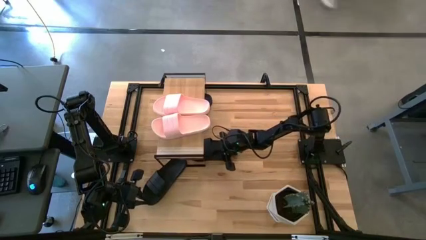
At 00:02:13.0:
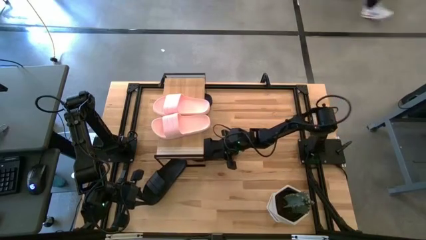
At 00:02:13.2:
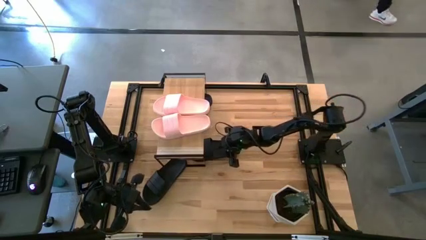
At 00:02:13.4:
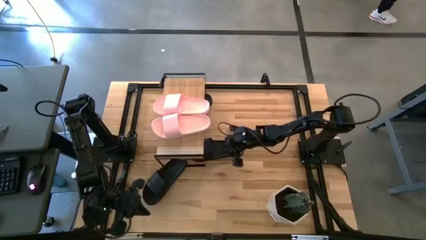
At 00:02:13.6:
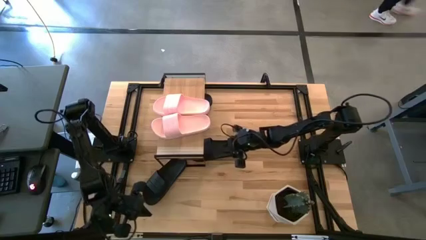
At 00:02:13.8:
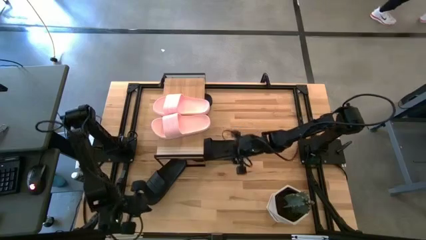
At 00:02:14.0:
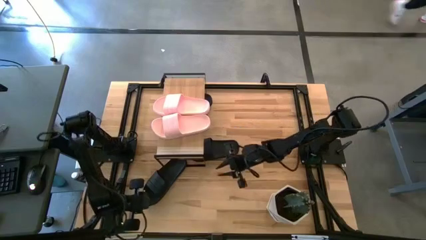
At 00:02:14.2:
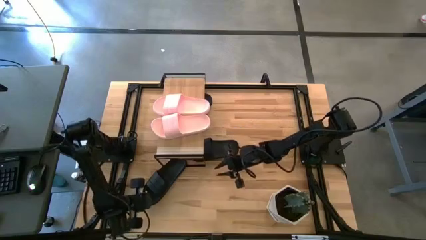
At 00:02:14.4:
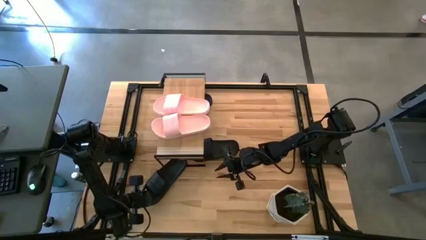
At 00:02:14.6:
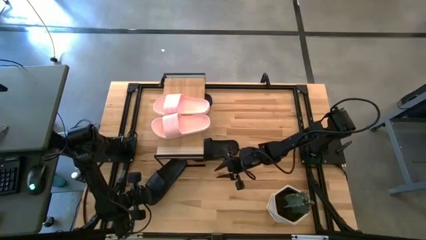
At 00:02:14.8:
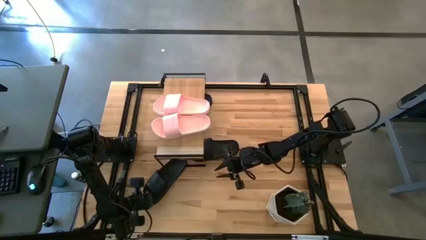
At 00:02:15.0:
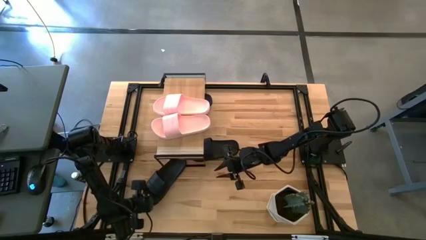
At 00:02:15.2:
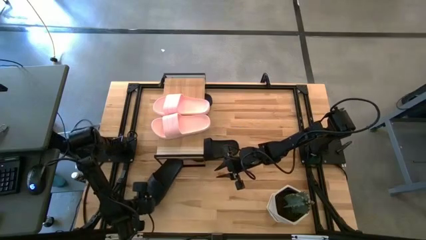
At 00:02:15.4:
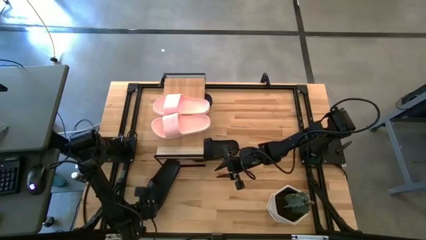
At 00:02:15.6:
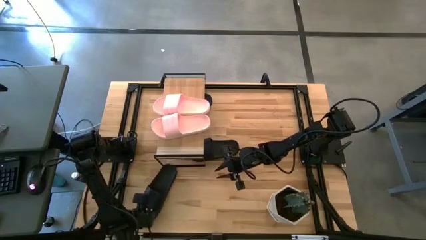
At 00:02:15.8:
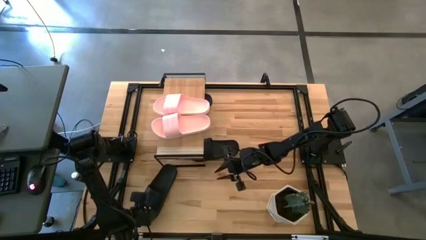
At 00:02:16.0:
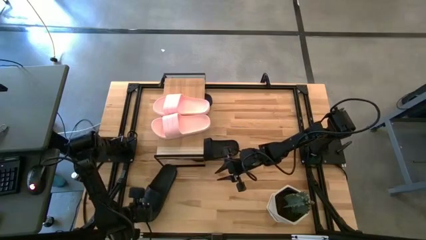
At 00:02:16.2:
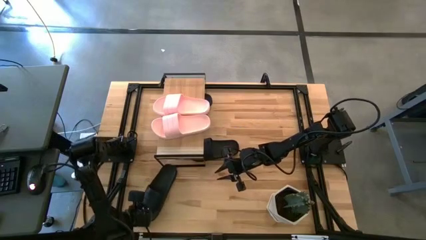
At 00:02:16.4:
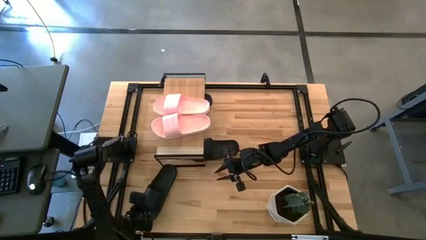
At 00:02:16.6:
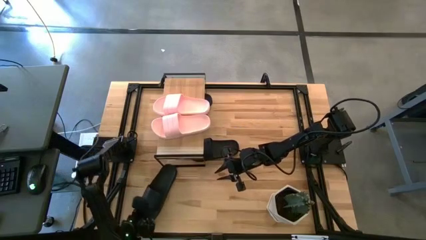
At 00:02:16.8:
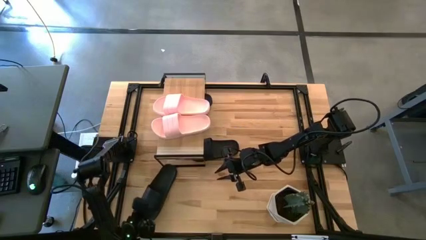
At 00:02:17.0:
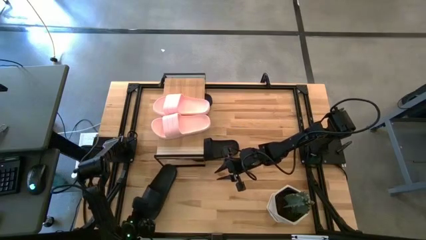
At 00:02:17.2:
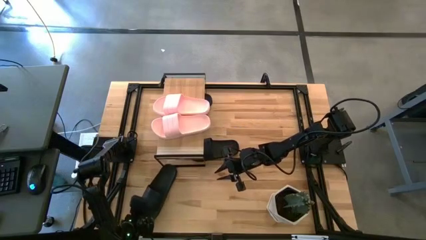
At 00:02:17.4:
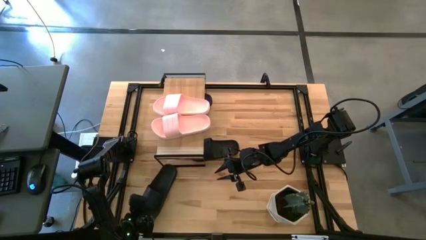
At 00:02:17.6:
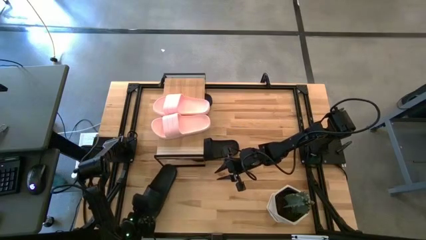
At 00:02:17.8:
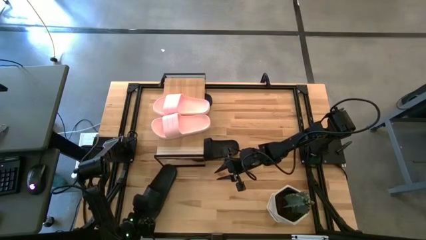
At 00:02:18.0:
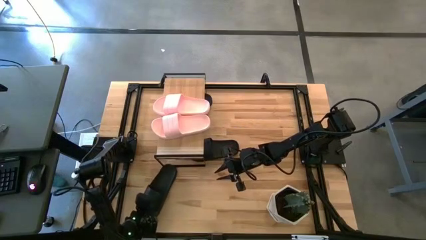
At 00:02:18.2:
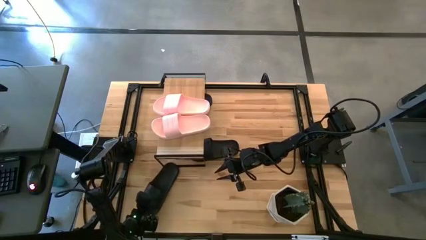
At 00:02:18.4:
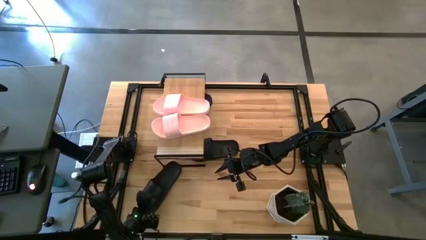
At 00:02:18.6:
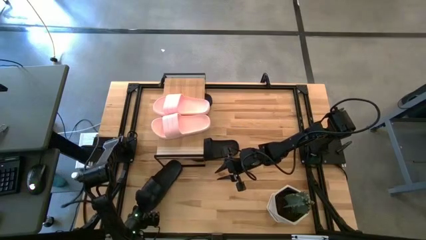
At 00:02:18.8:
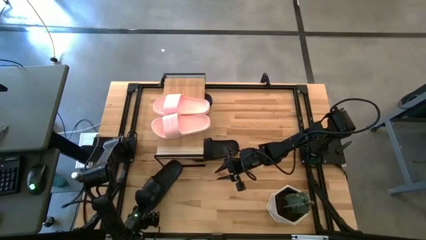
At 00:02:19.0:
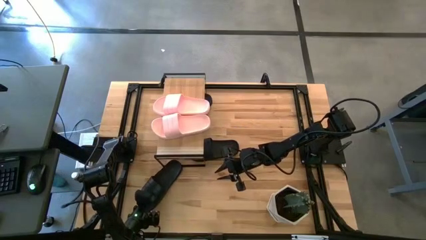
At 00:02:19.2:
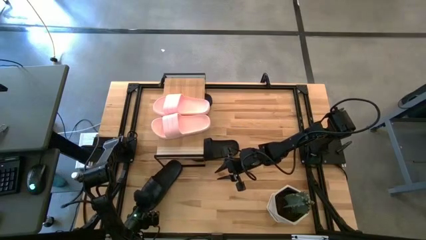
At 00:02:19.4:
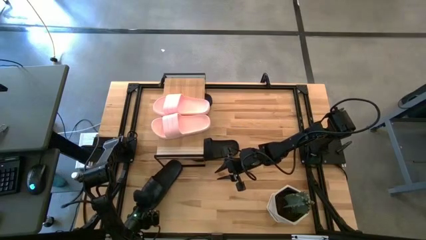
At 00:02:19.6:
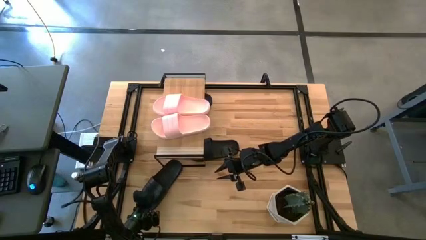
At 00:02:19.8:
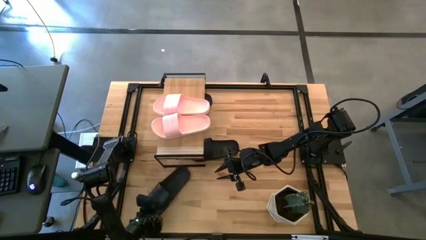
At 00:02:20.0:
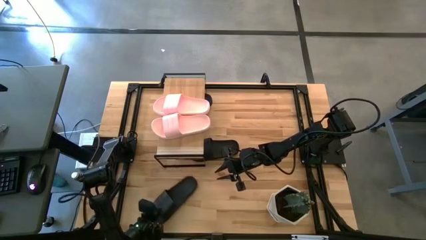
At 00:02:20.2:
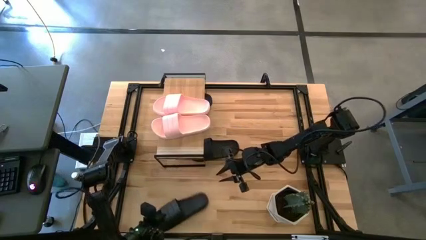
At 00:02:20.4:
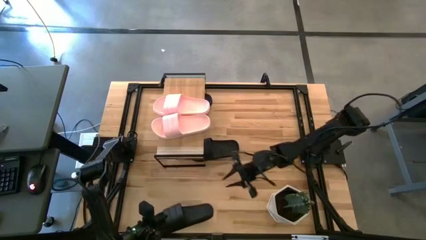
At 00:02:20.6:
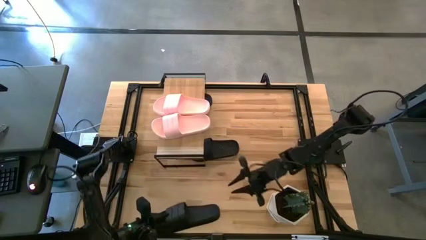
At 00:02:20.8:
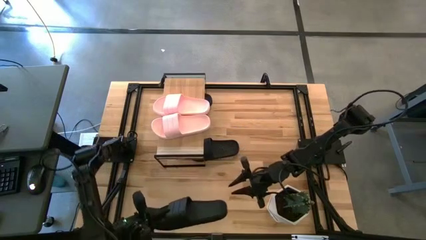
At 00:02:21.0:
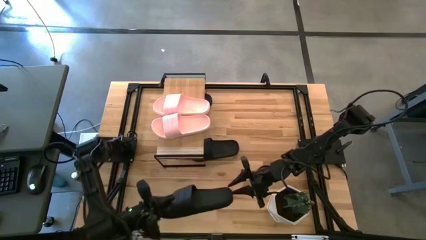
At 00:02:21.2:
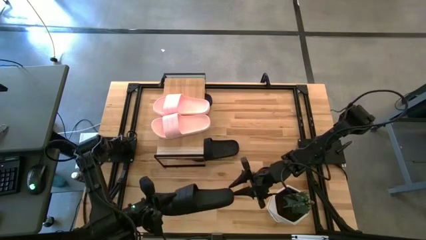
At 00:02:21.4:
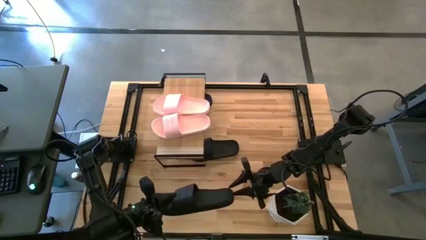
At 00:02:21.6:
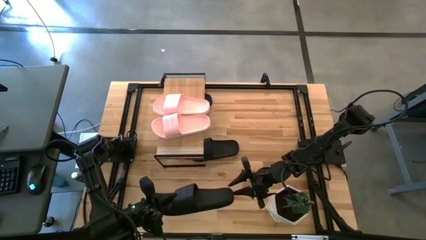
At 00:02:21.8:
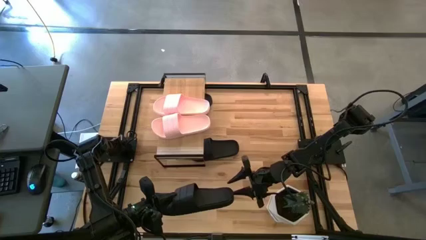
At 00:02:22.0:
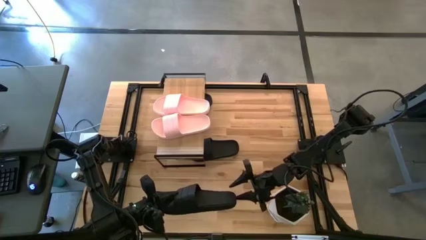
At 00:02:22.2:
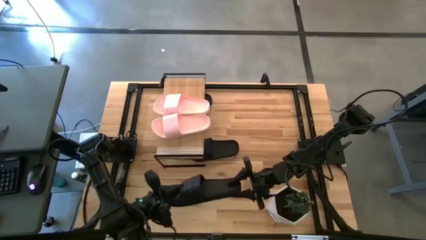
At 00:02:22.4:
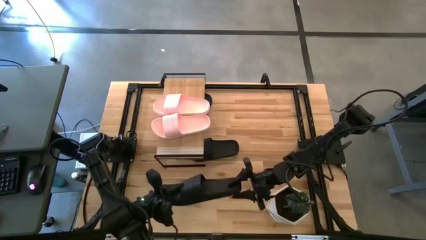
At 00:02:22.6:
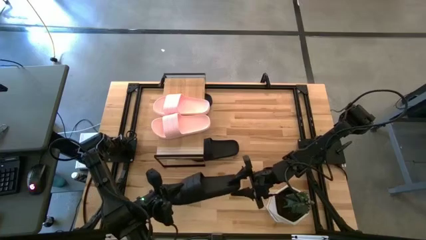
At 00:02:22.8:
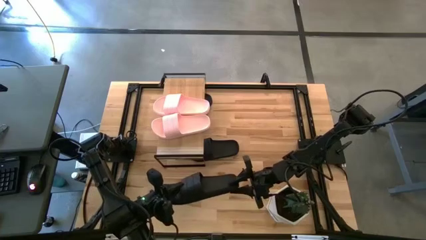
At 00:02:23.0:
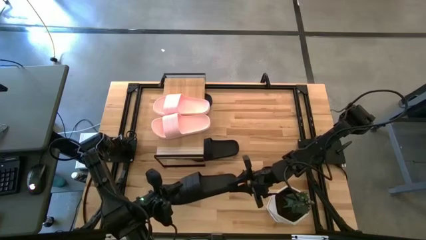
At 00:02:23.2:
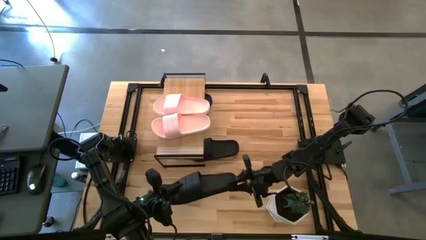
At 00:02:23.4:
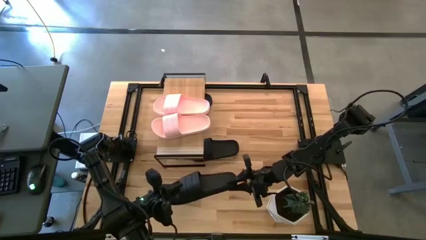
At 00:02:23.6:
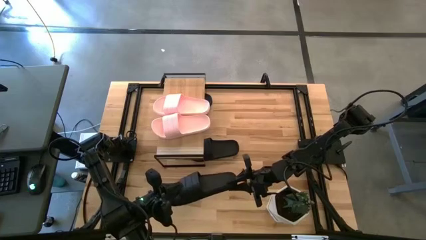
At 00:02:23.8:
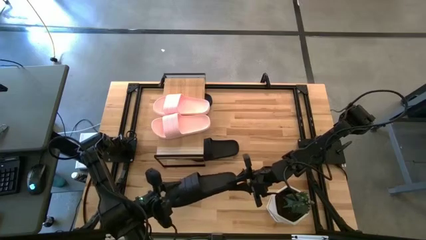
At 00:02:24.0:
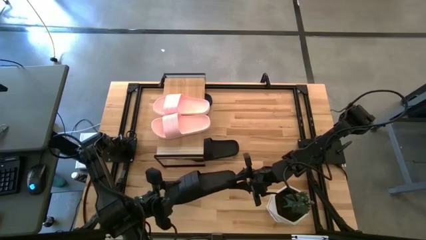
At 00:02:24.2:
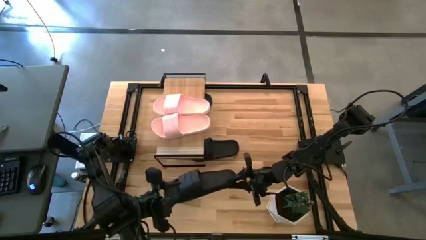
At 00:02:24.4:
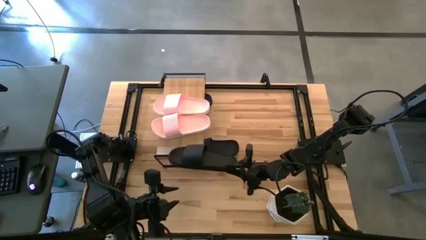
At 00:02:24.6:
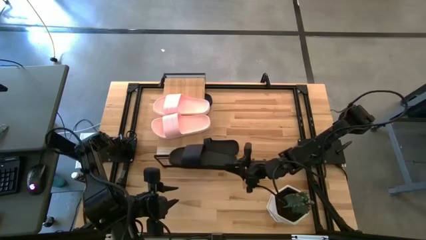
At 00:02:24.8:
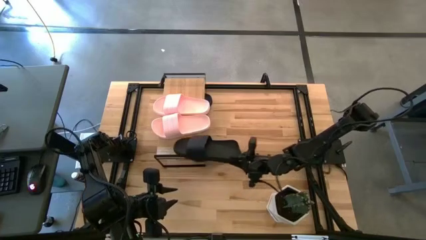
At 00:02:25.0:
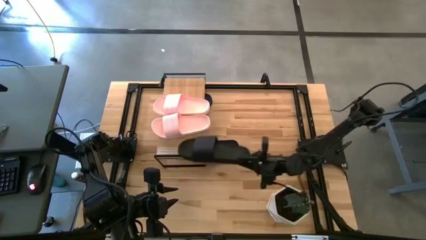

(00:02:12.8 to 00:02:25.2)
Task: Pick and place slides into the shelf
Put the black slide under the shelf
